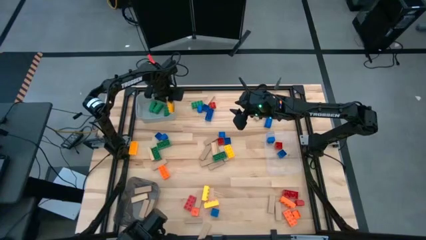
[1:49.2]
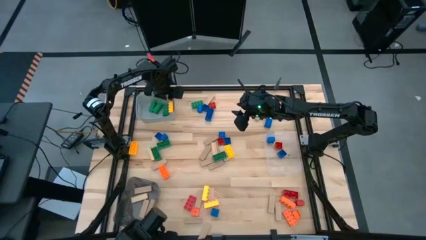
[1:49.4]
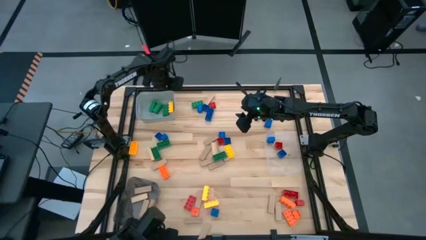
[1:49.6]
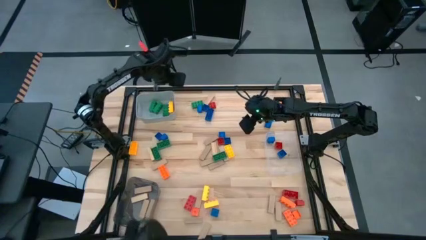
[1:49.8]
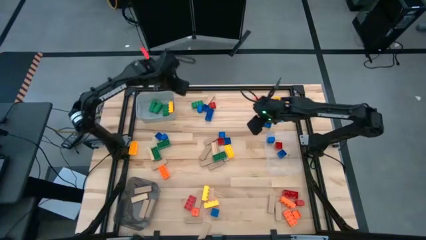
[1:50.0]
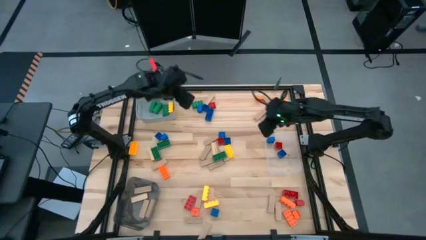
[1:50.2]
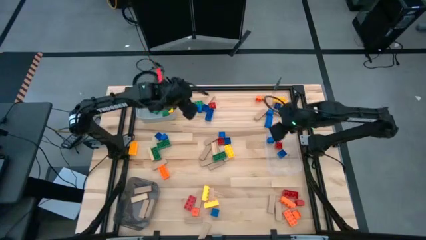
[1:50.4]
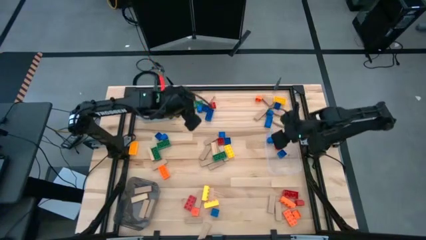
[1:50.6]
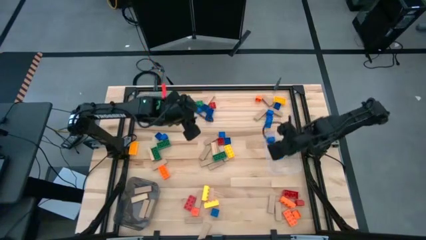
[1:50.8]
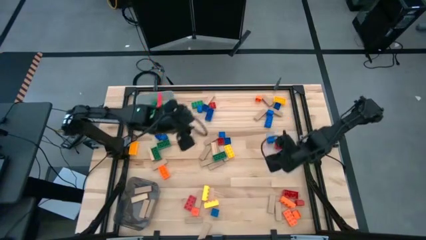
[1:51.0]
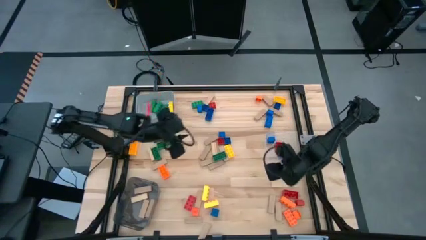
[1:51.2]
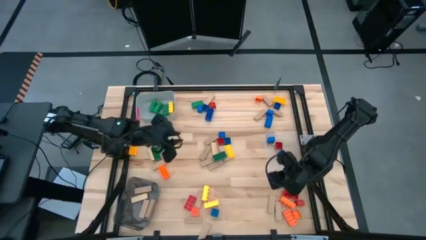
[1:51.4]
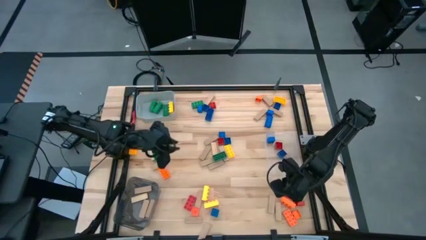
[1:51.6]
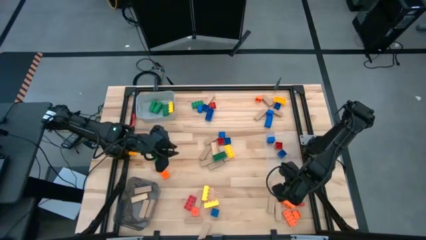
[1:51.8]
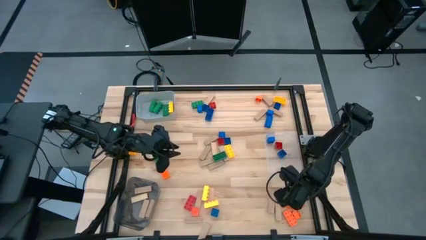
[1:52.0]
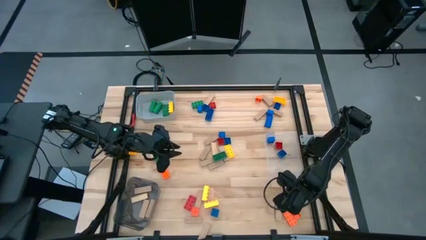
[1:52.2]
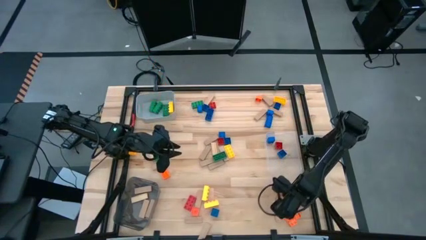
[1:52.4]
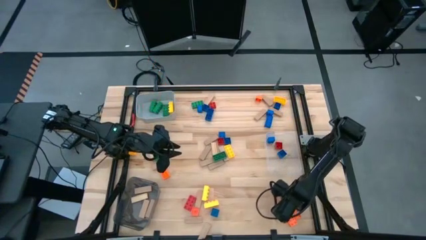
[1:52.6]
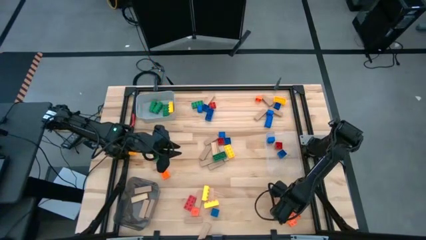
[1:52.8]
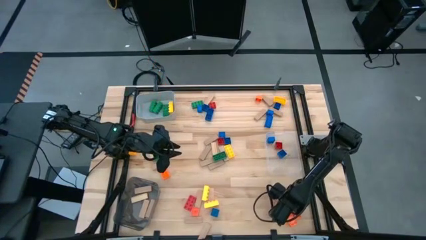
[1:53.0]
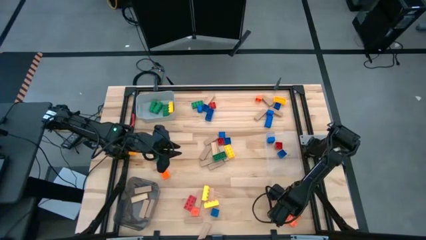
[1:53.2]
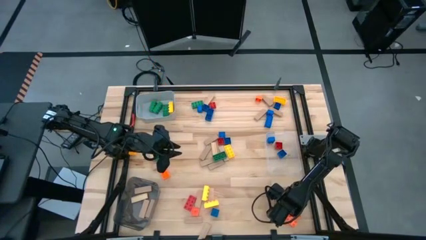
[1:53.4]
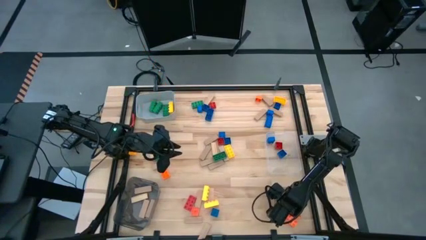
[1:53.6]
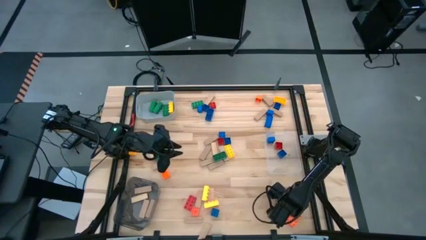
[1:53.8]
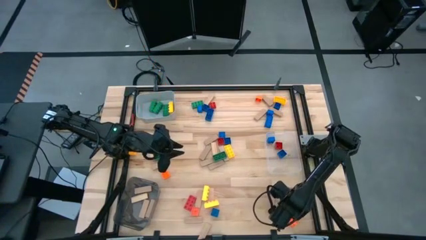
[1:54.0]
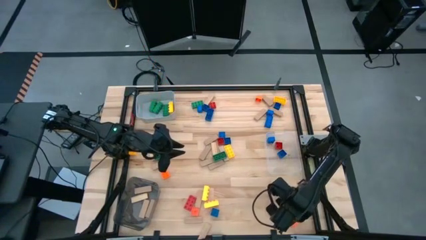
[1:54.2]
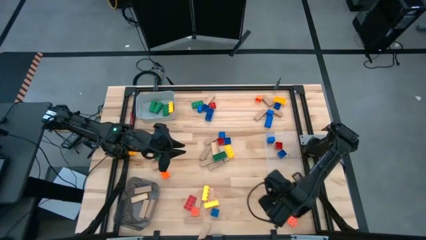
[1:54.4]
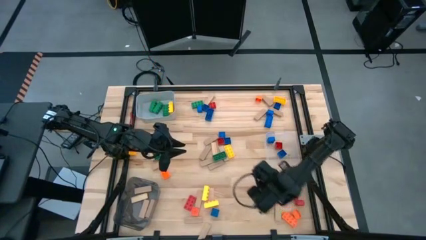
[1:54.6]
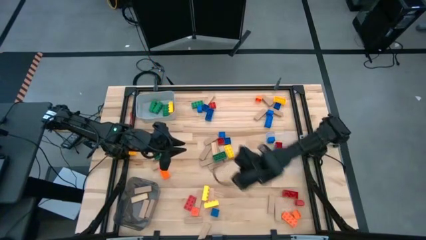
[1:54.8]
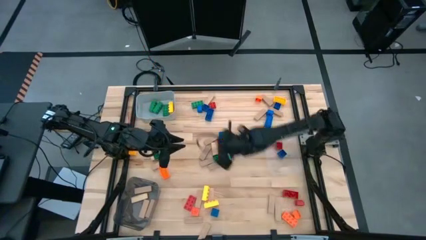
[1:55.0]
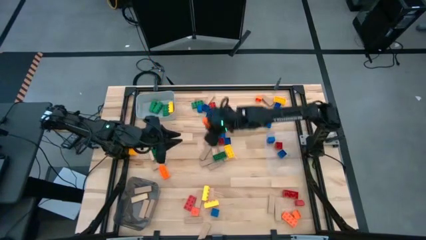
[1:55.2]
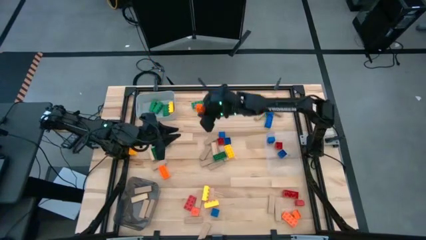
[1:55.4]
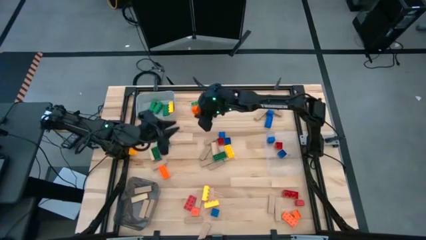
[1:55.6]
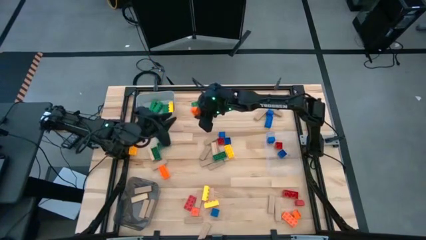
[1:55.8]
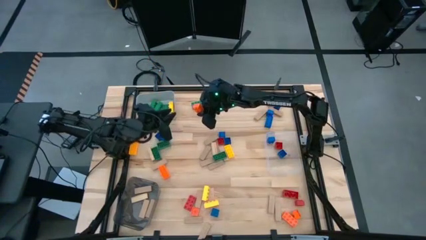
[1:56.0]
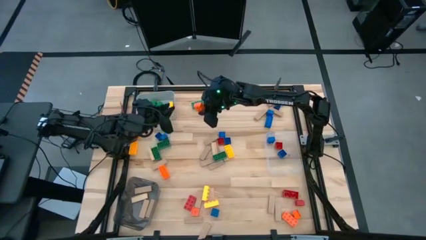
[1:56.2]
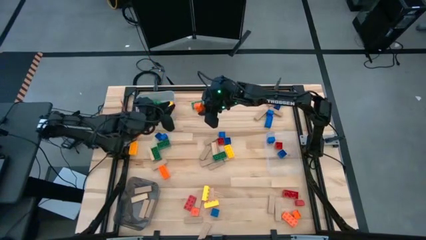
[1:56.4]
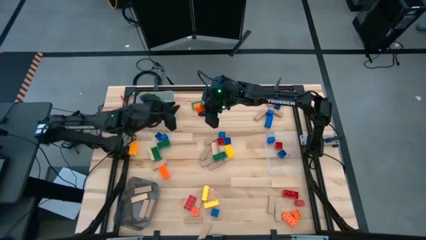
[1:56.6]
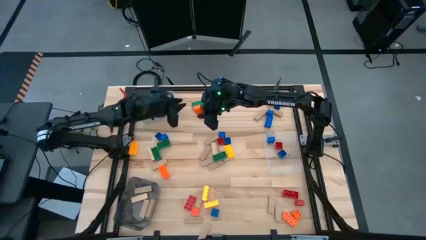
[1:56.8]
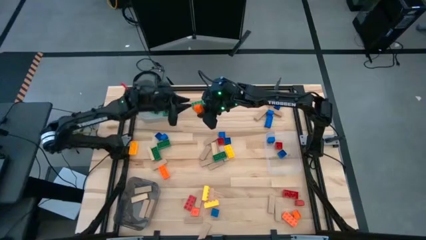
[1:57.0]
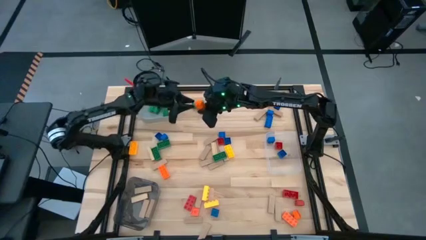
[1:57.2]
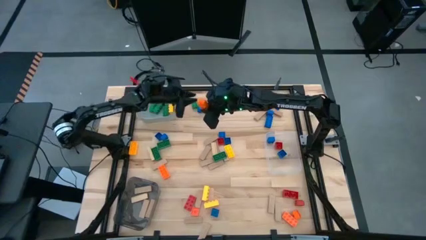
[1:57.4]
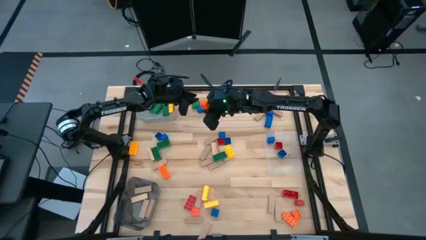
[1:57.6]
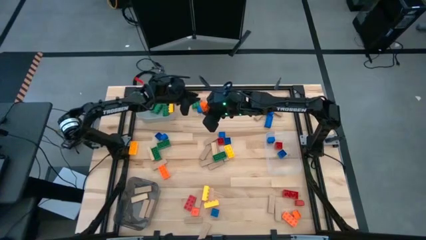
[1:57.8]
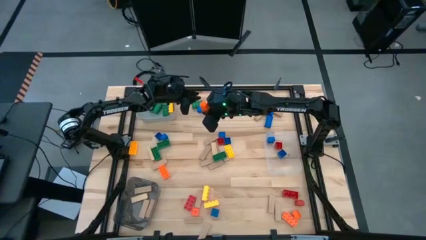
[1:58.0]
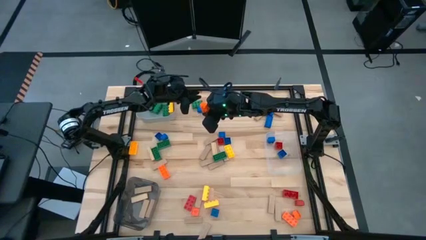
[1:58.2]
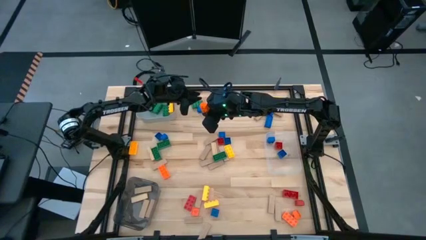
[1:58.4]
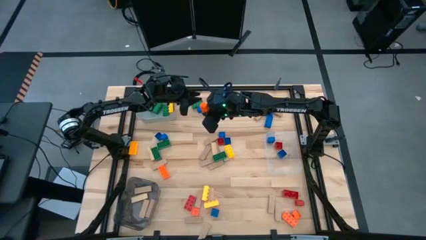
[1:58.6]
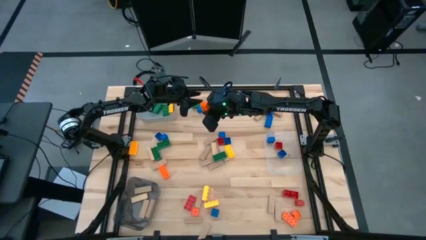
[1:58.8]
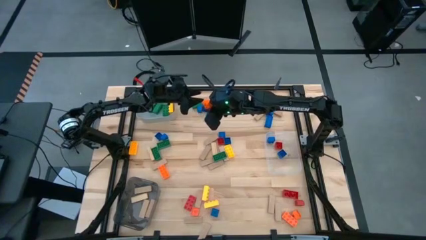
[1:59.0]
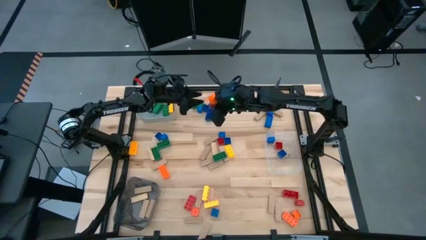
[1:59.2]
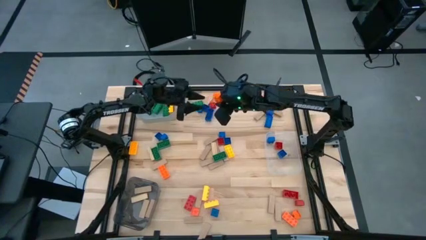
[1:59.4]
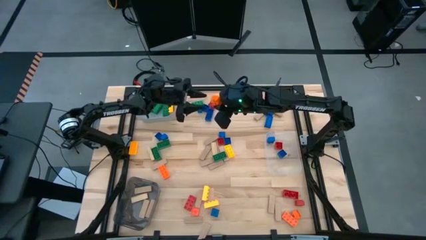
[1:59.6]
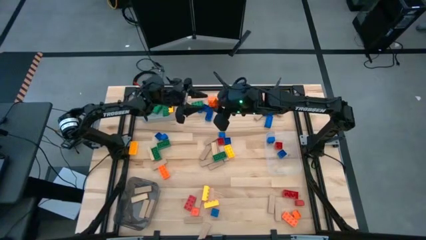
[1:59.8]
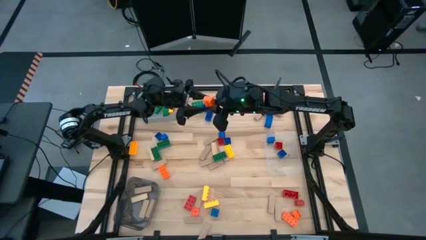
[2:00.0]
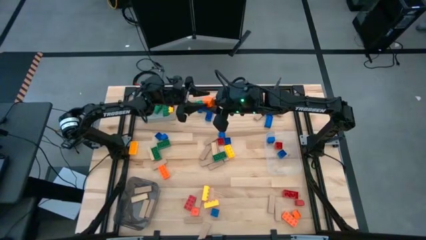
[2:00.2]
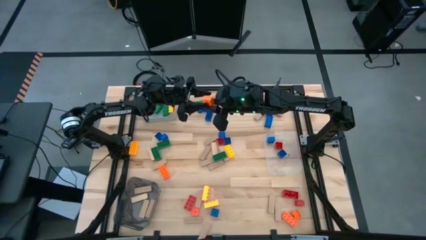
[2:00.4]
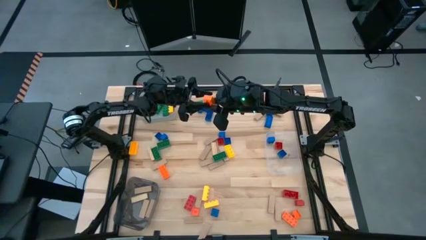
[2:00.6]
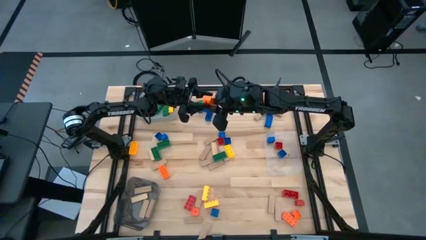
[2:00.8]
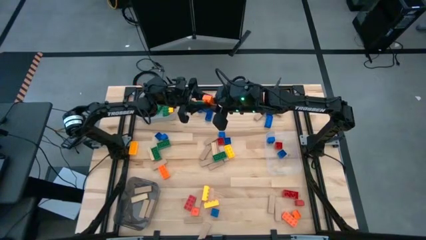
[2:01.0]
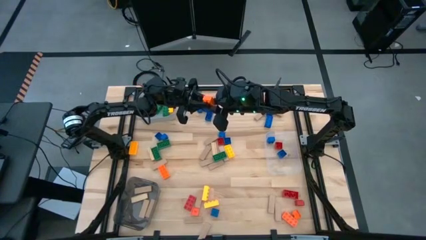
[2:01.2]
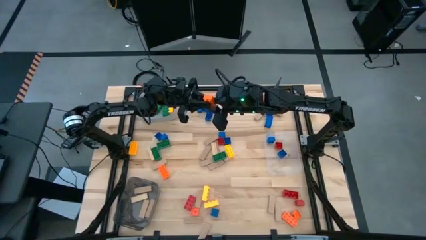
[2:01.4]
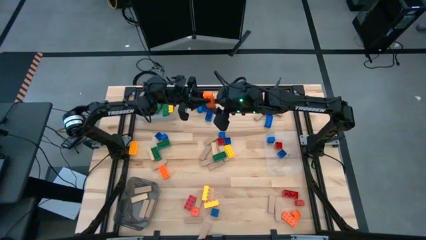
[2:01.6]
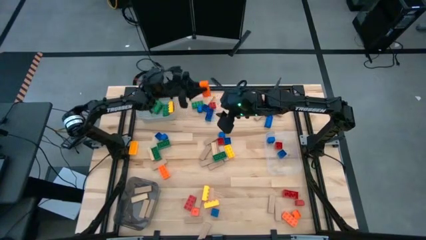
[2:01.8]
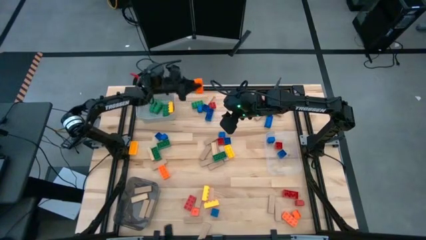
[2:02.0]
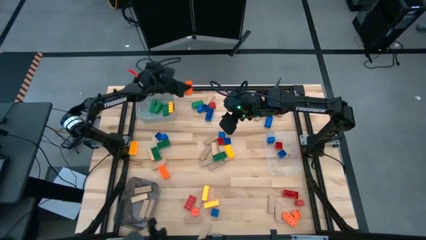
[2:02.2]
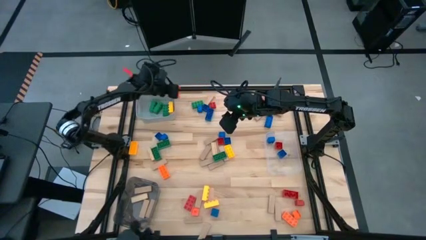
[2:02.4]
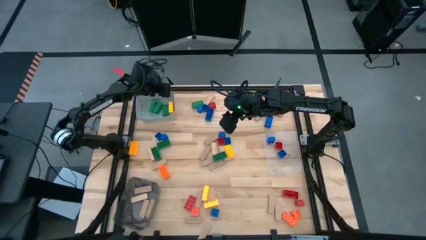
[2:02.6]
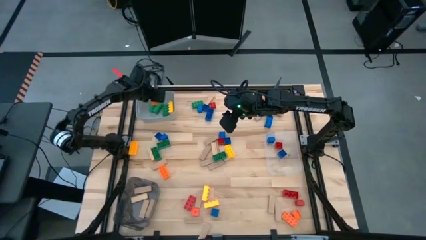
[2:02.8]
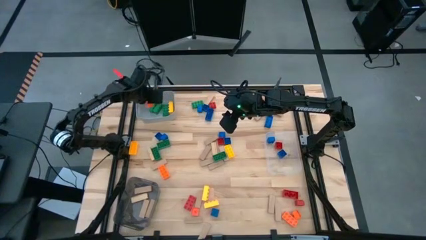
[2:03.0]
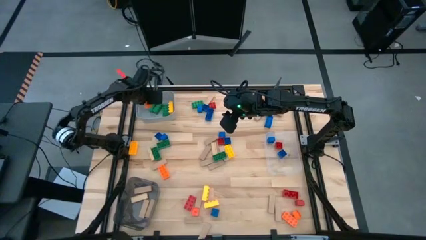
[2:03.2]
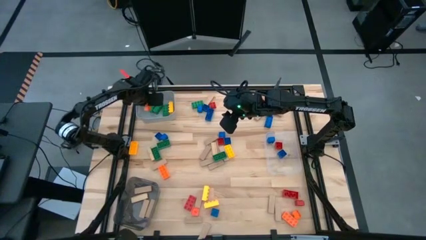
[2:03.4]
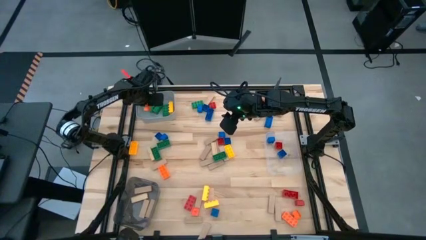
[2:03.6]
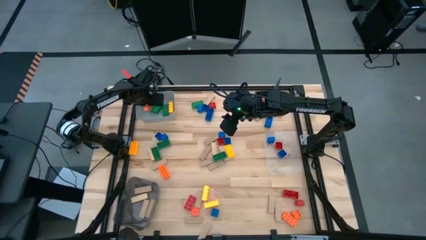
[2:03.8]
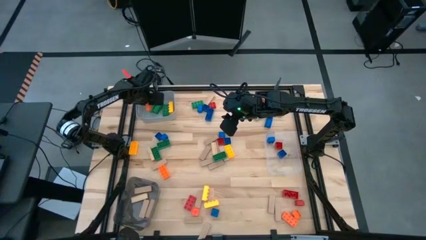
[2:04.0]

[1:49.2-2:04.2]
Task: Sort blocks by size
Put the large orange game piece into the gray bin
